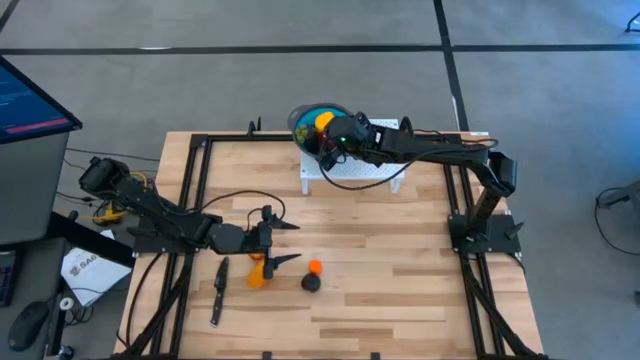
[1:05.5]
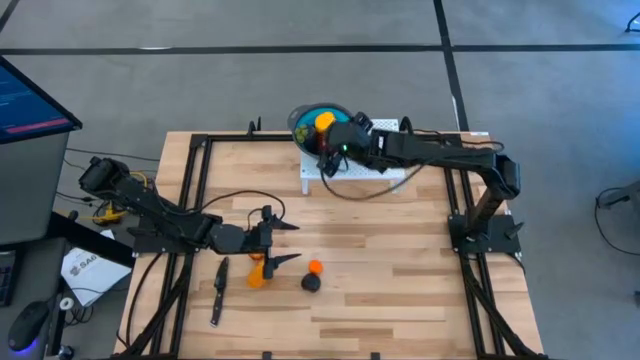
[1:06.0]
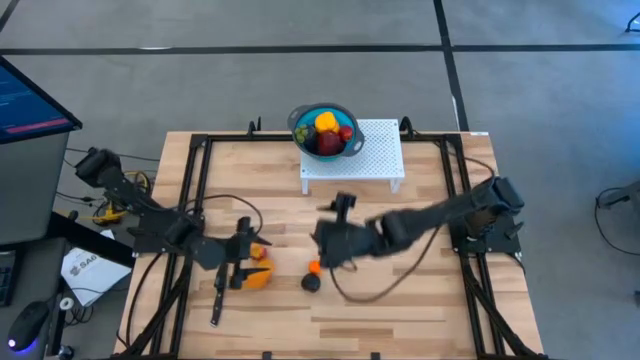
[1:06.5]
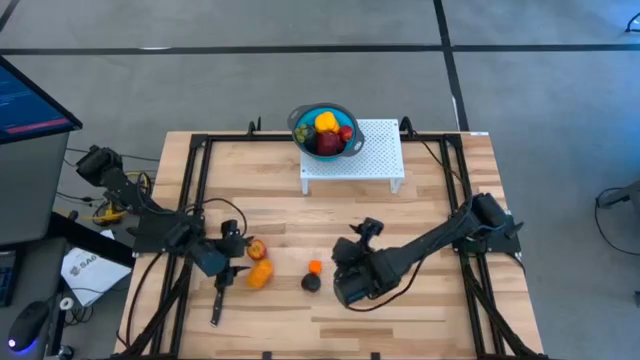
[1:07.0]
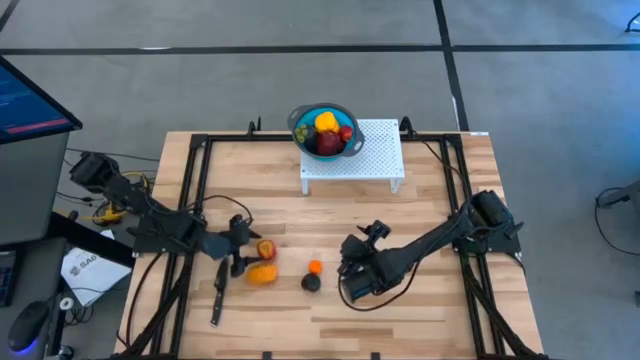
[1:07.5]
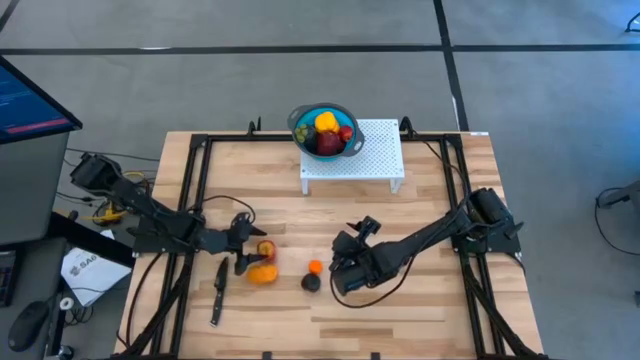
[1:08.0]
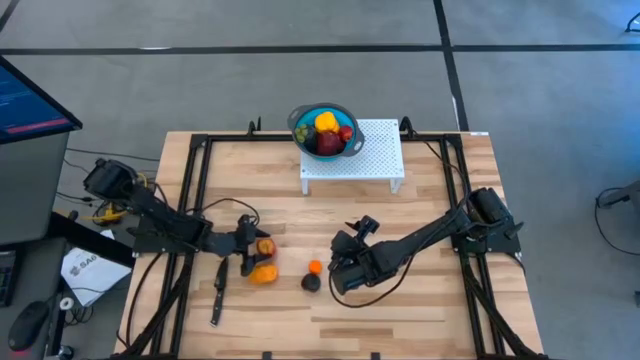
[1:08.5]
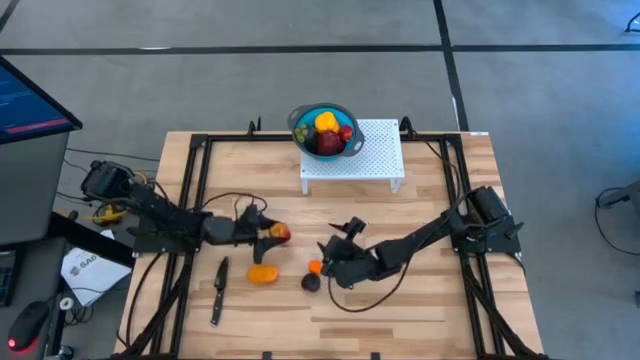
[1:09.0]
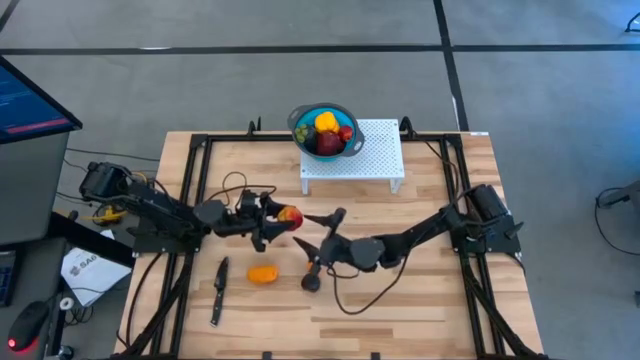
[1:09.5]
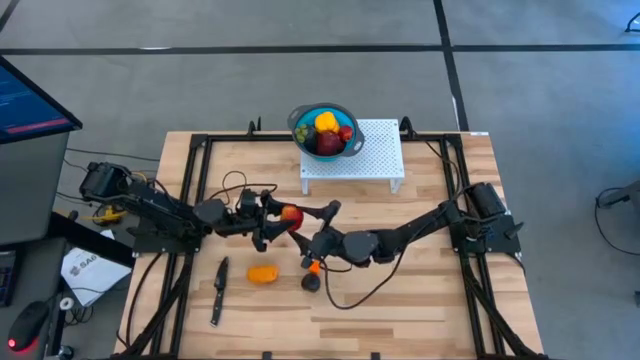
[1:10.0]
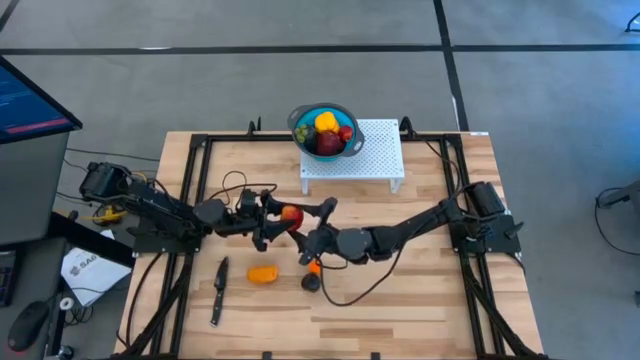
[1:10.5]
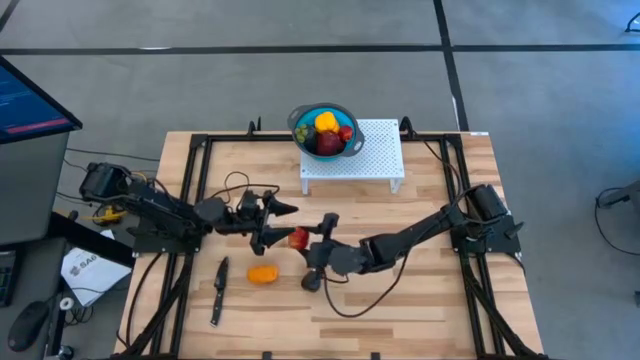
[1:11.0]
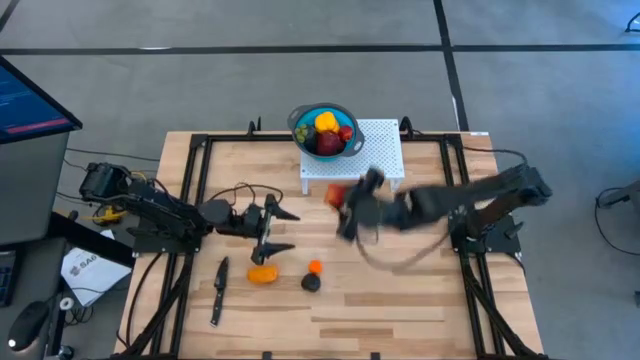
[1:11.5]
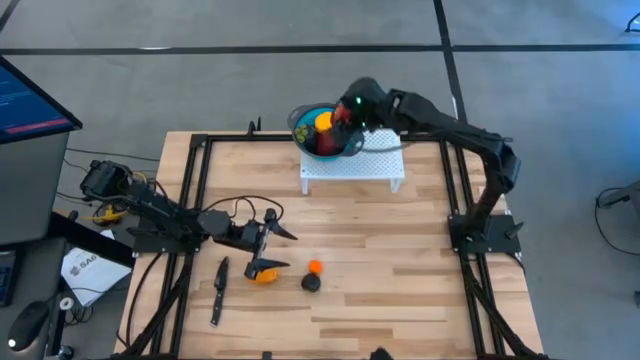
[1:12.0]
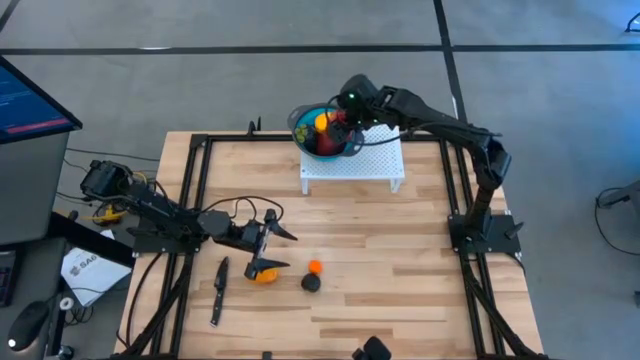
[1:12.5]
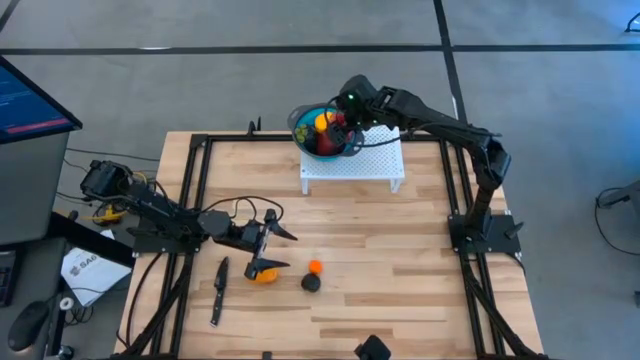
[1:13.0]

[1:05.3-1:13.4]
Task: Pick & Place Fruit
Put the red apple into the blue strainer bowl on the shelf

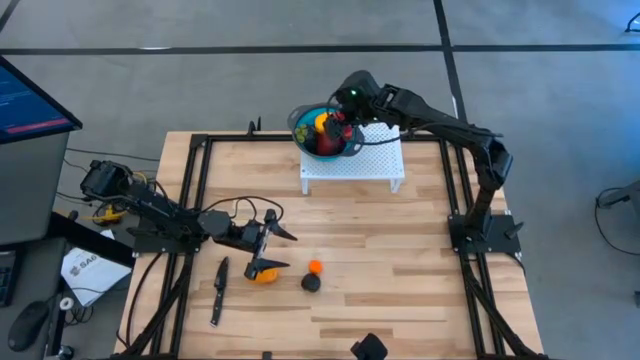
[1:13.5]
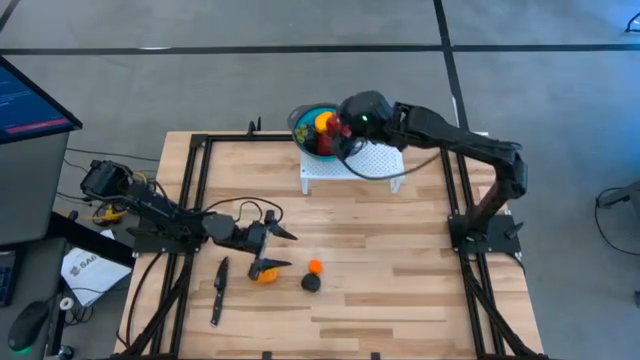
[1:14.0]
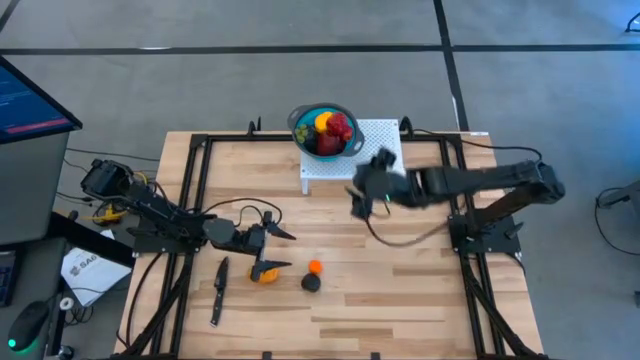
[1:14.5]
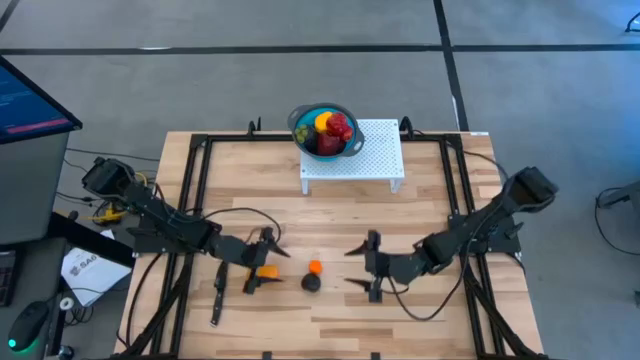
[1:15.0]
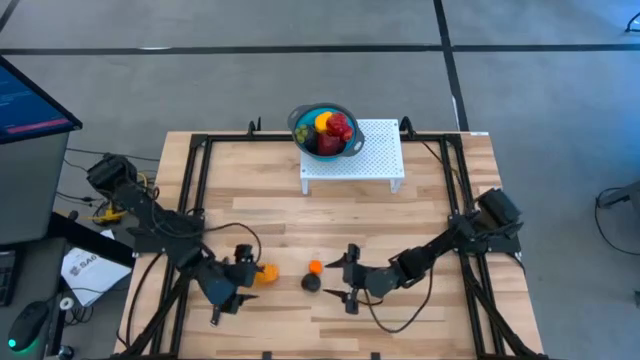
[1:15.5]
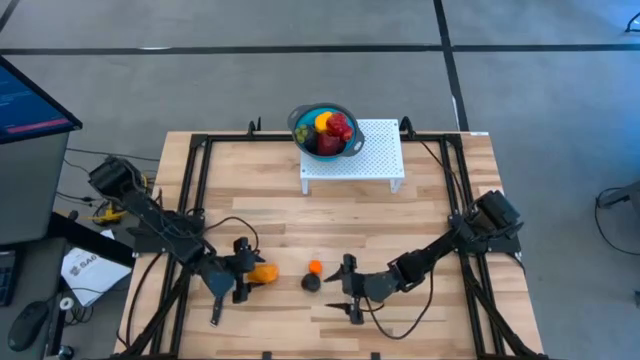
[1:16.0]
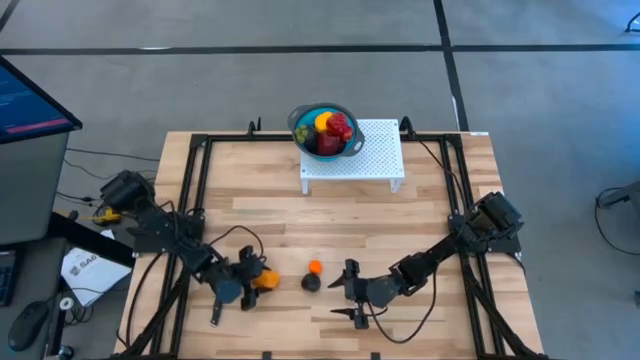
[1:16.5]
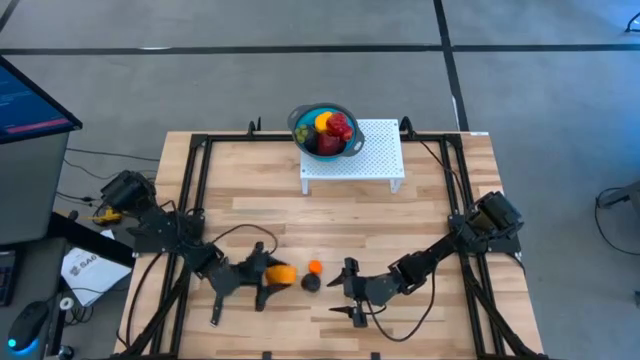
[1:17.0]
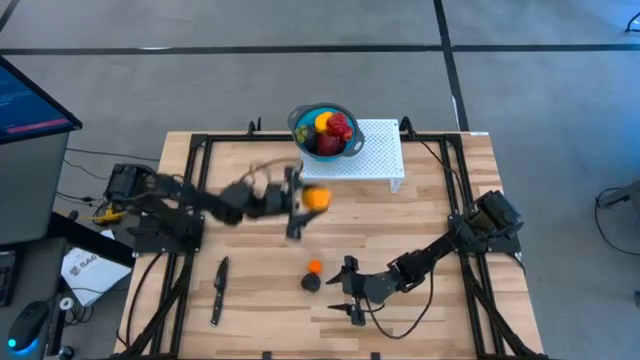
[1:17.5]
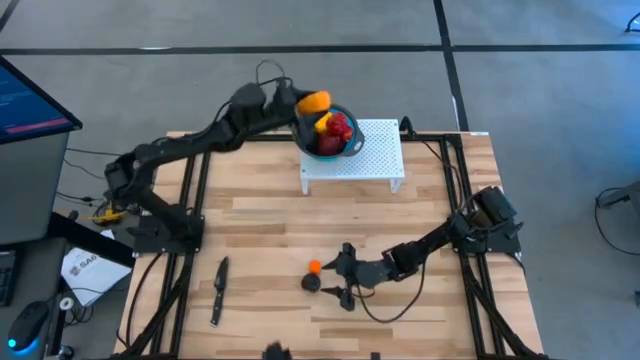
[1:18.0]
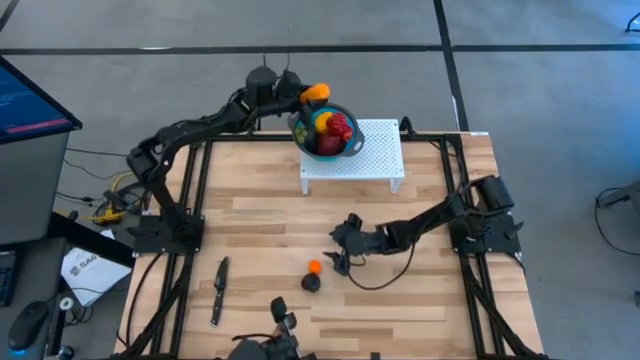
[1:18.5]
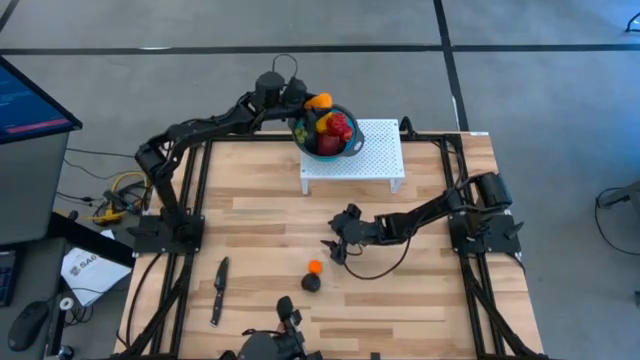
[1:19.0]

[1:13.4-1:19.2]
Put the potato into the blue strainer bowl on the shelf

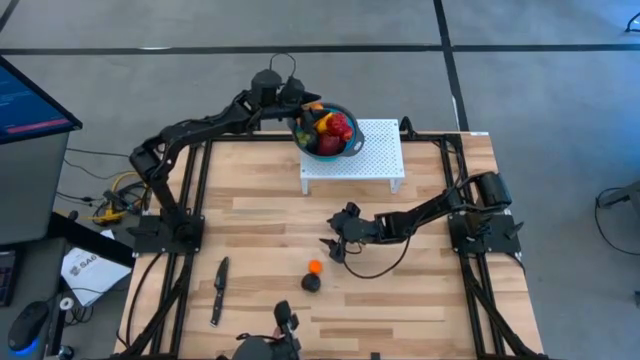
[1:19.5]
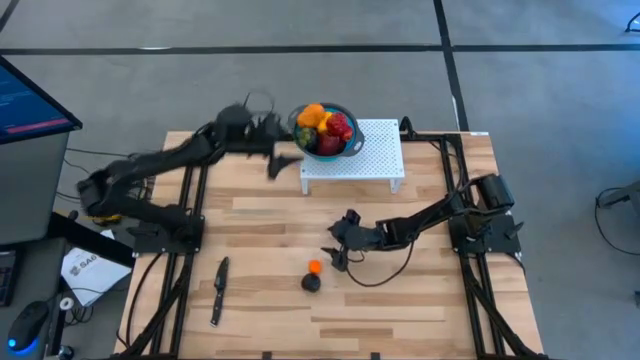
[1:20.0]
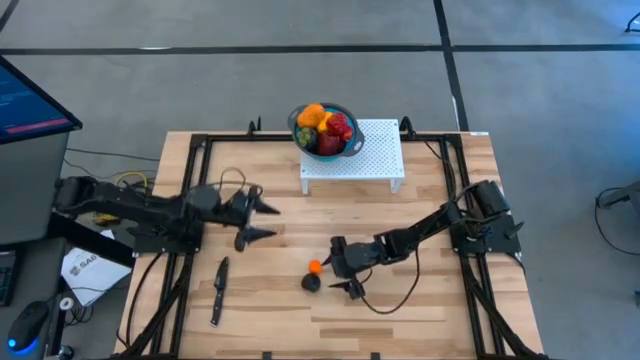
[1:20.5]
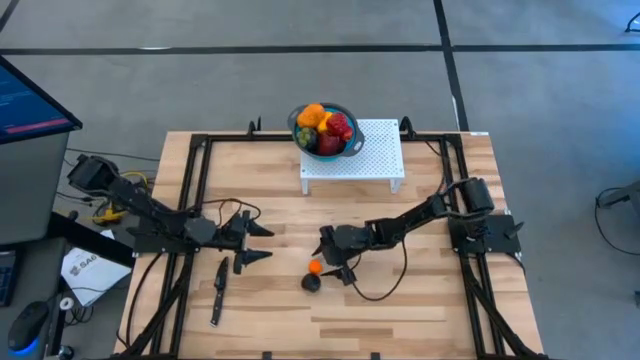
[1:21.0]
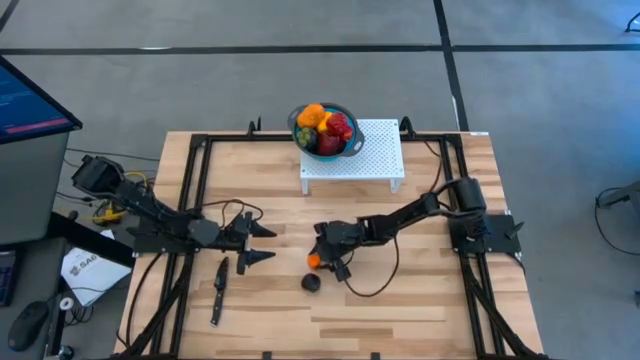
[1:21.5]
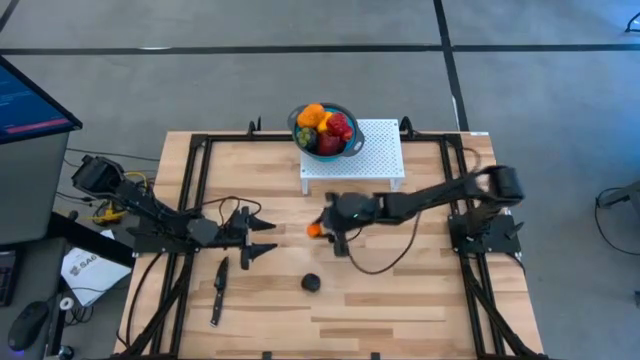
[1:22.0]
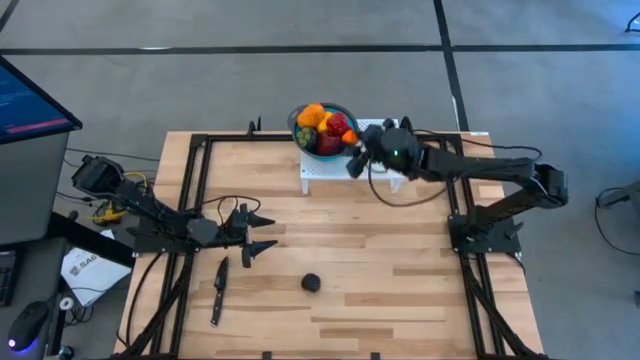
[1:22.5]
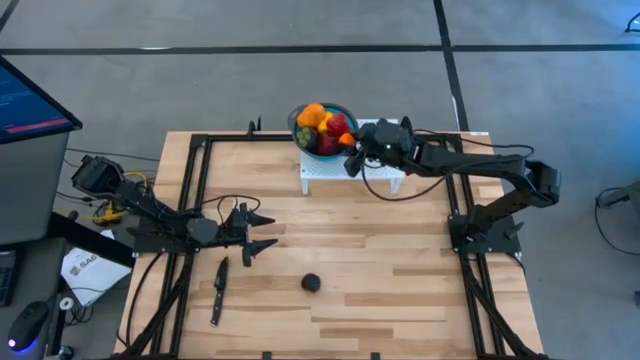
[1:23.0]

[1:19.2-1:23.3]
Put the orange into the blue strainer bowl on the shelf

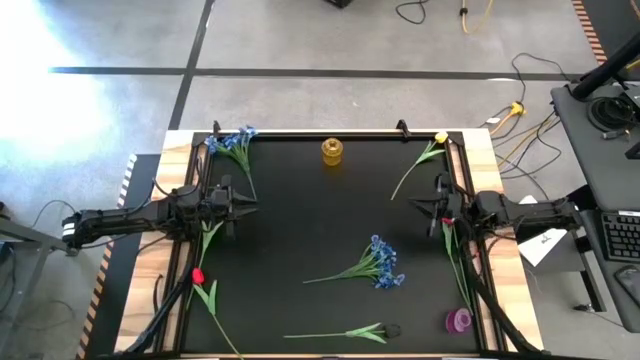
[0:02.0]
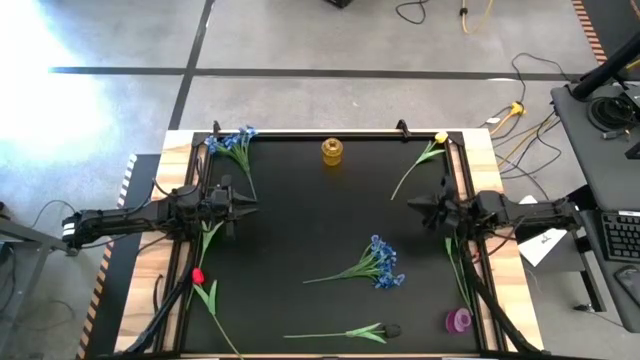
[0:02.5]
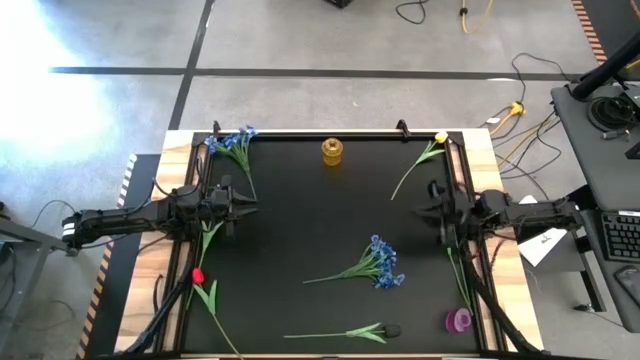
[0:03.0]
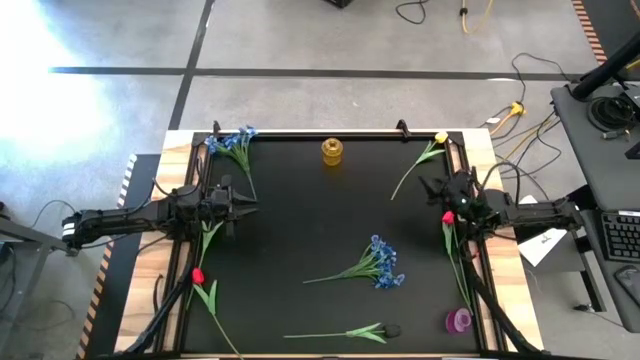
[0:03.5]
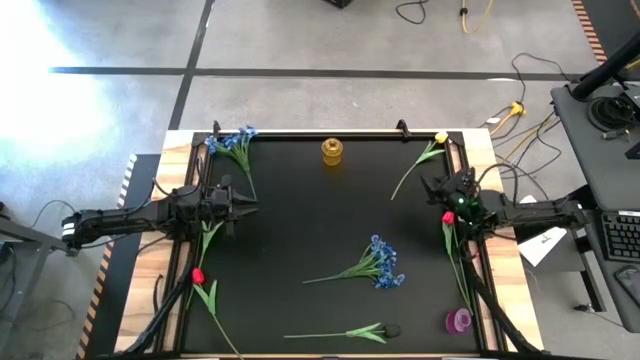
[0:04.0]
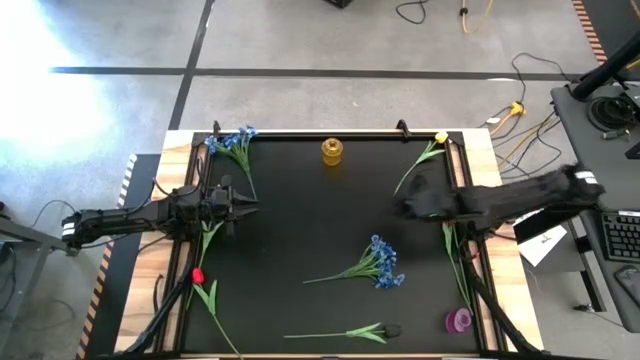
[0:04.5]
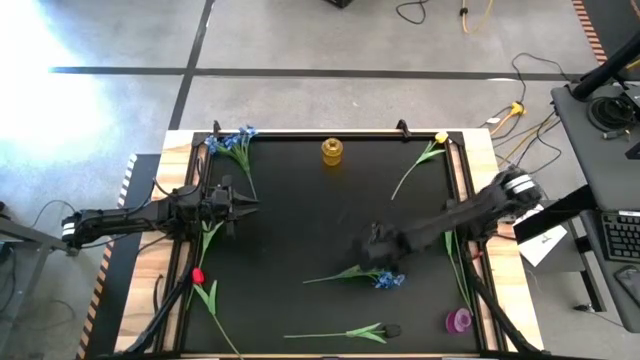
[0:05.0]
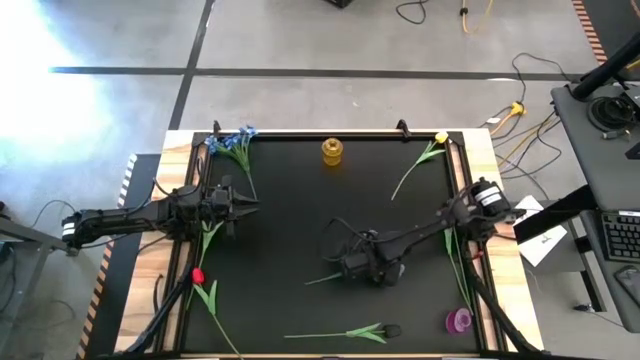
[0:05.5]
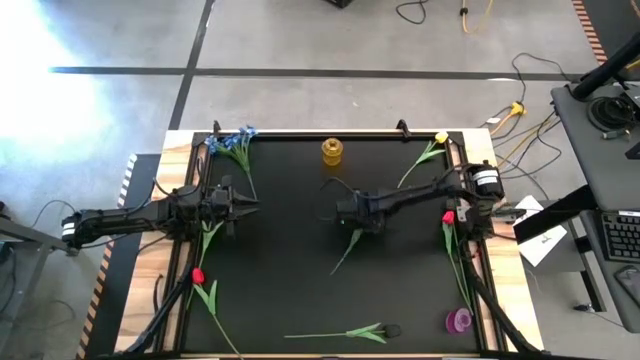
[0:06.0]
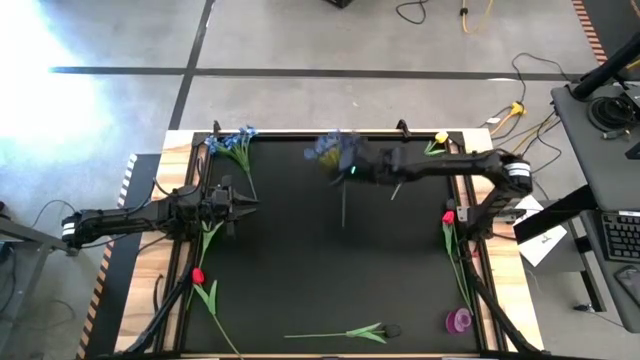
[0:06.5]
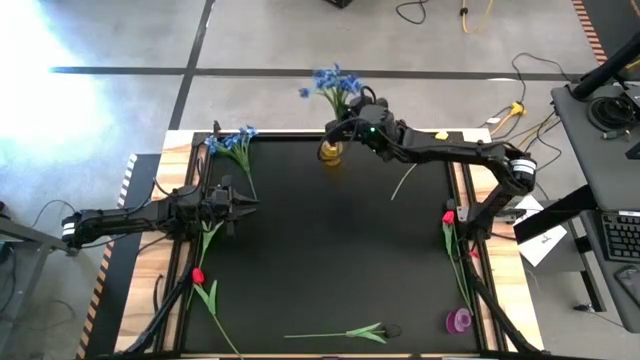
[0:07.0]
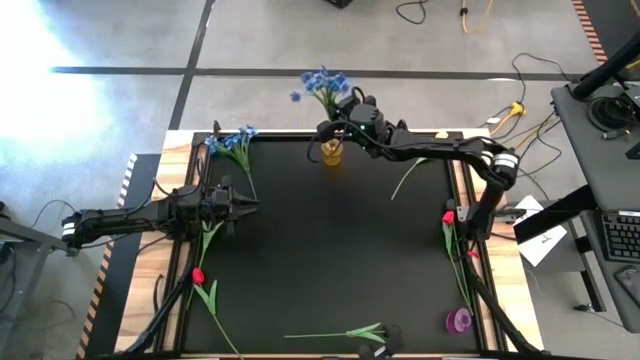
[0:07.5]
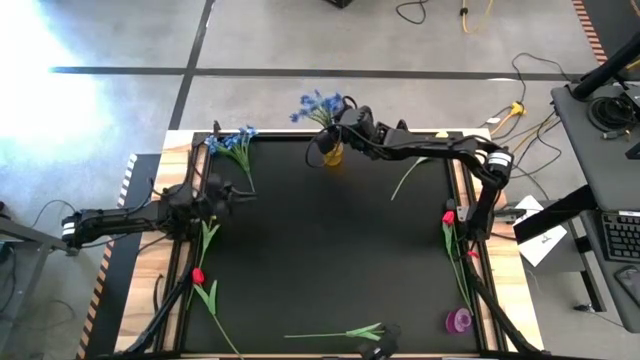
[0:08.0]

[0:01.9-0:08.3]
Task: Sort flowers into vase by color
Put the bottom blue flowers into the yellow vase
